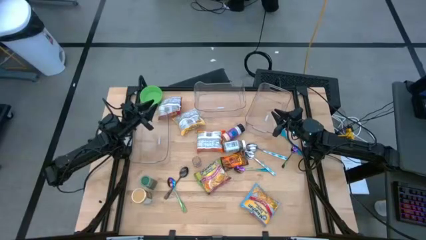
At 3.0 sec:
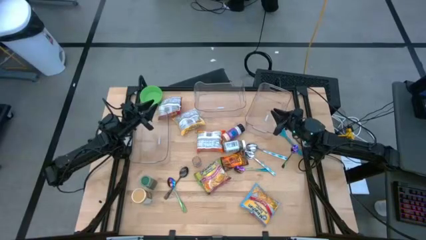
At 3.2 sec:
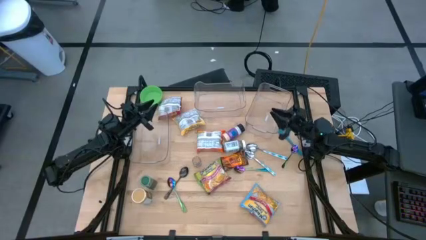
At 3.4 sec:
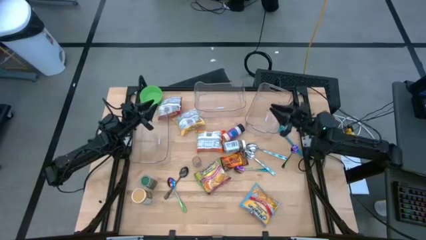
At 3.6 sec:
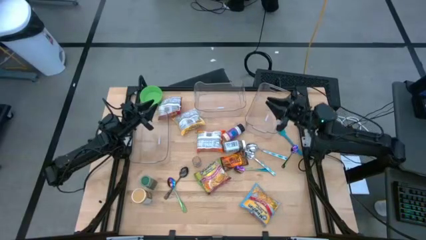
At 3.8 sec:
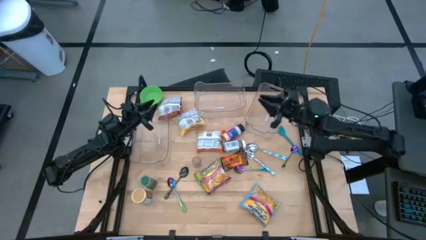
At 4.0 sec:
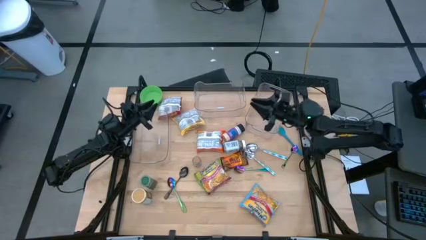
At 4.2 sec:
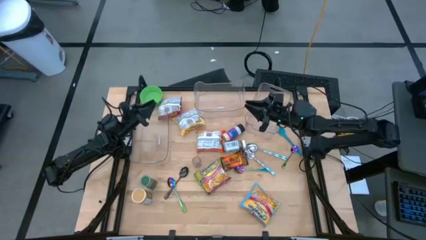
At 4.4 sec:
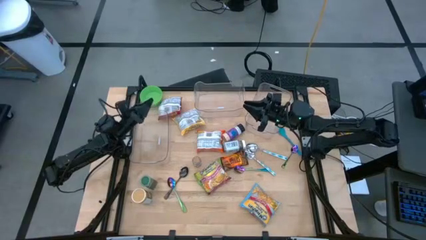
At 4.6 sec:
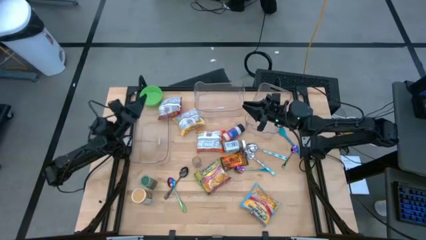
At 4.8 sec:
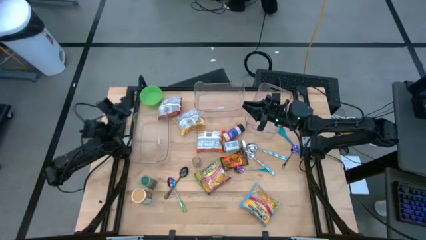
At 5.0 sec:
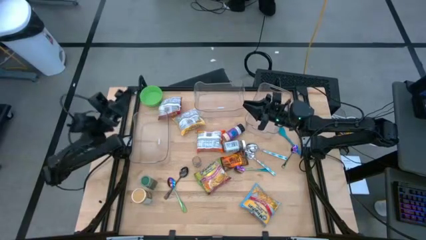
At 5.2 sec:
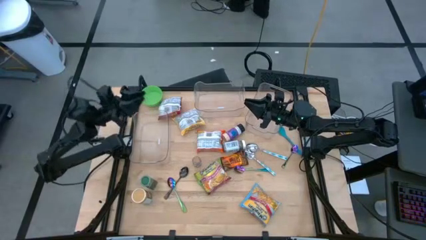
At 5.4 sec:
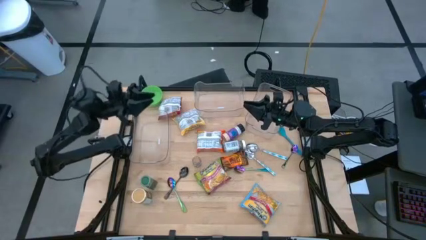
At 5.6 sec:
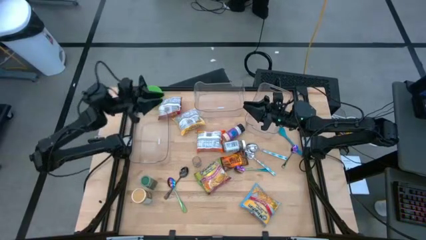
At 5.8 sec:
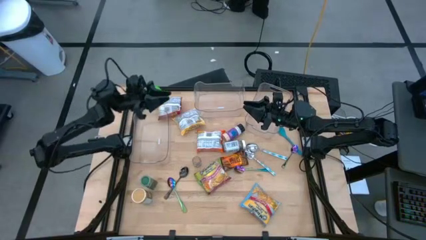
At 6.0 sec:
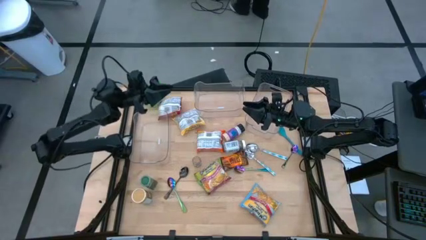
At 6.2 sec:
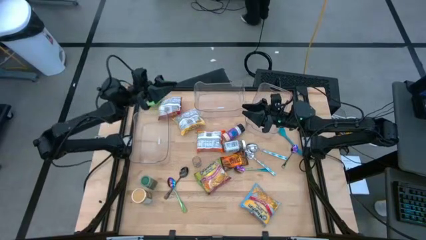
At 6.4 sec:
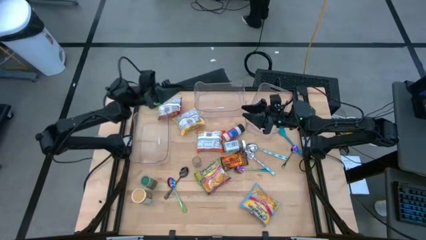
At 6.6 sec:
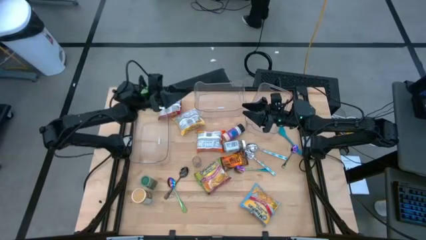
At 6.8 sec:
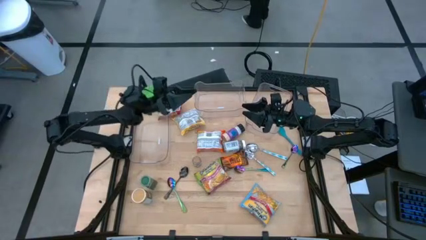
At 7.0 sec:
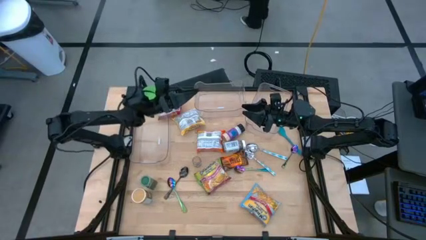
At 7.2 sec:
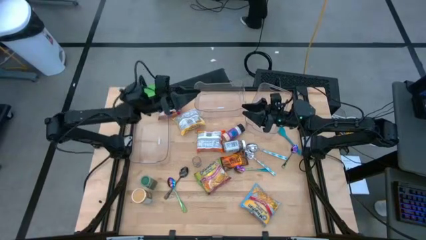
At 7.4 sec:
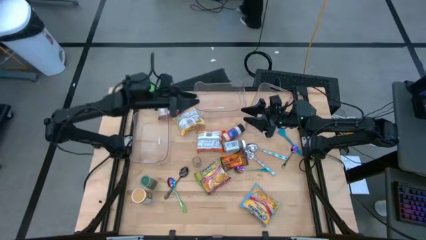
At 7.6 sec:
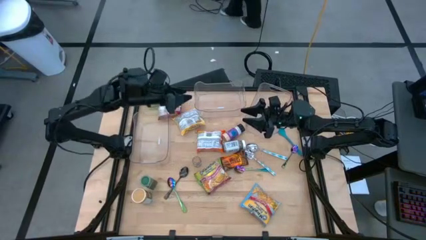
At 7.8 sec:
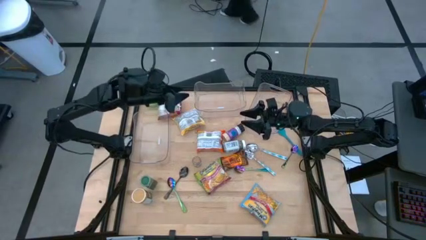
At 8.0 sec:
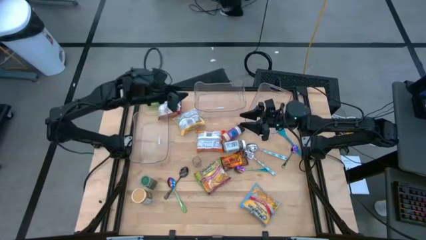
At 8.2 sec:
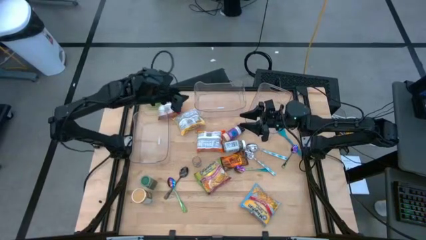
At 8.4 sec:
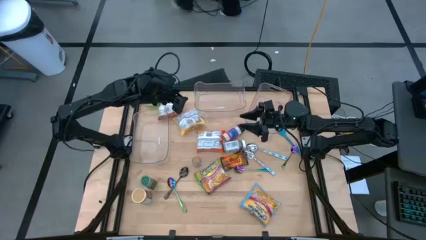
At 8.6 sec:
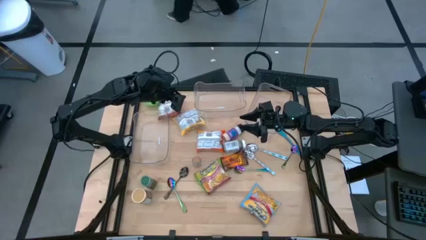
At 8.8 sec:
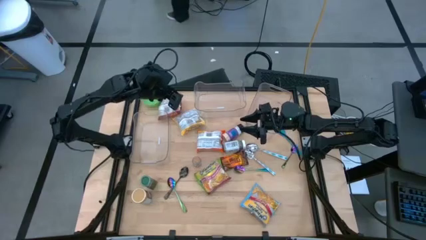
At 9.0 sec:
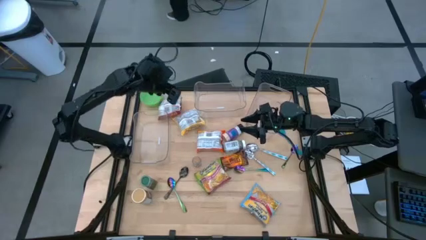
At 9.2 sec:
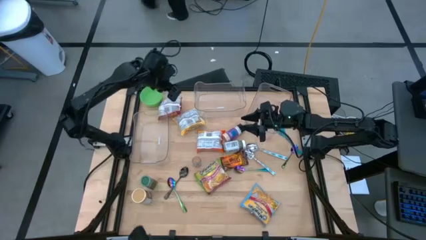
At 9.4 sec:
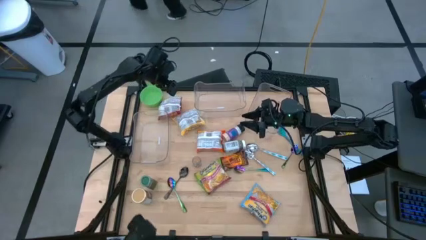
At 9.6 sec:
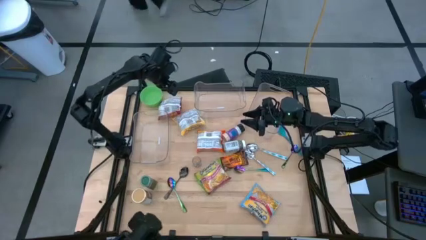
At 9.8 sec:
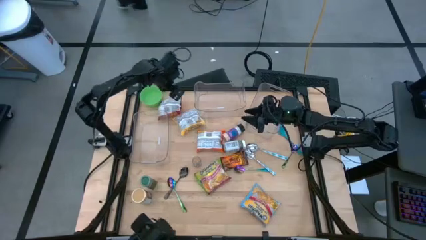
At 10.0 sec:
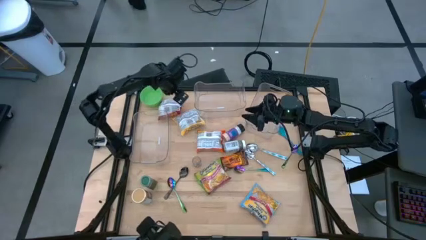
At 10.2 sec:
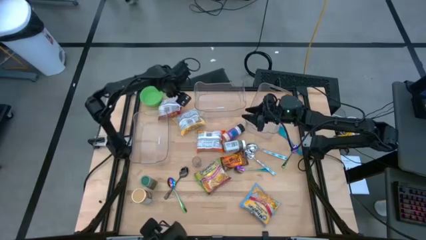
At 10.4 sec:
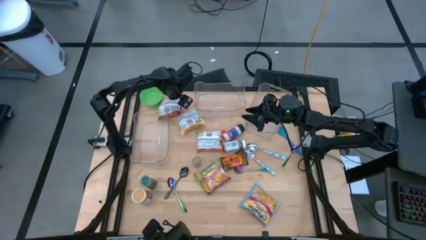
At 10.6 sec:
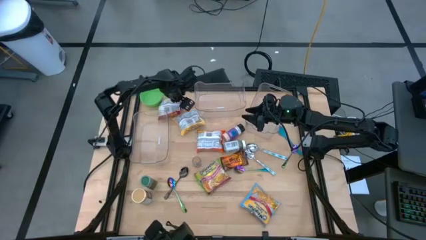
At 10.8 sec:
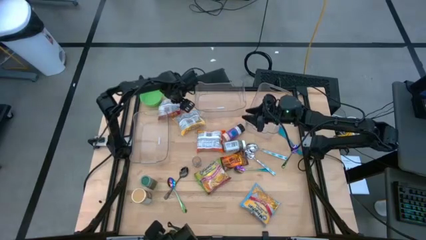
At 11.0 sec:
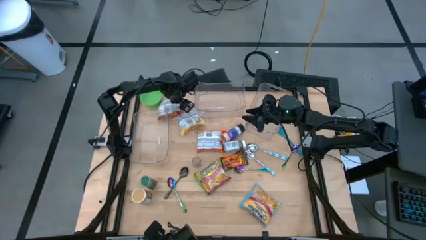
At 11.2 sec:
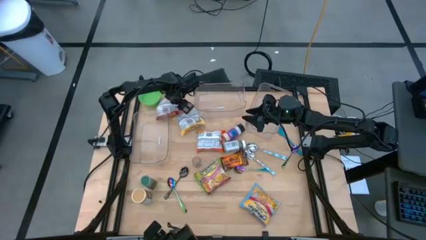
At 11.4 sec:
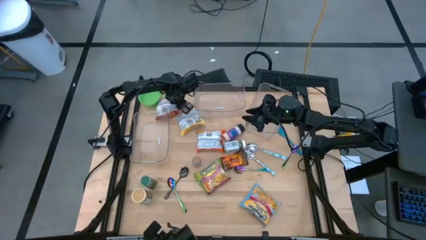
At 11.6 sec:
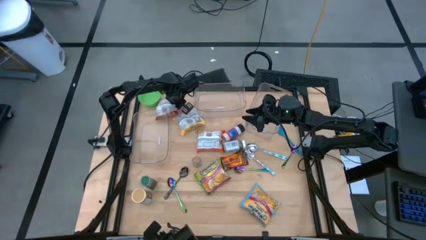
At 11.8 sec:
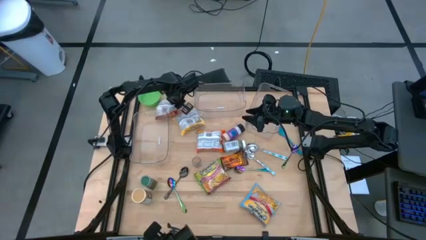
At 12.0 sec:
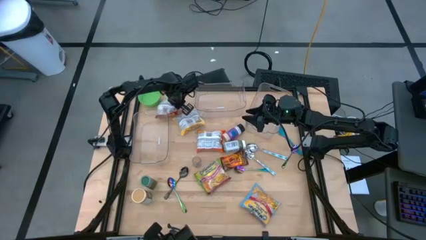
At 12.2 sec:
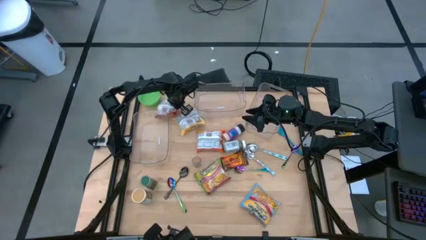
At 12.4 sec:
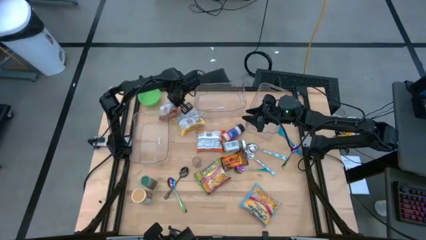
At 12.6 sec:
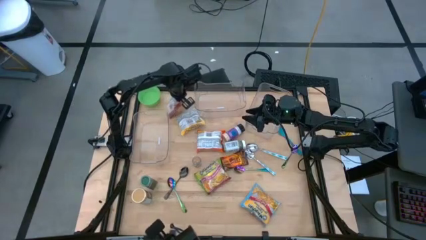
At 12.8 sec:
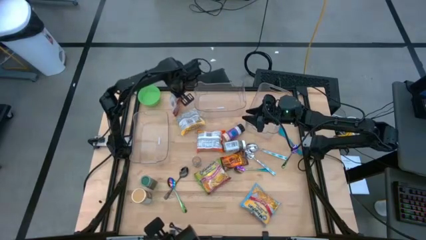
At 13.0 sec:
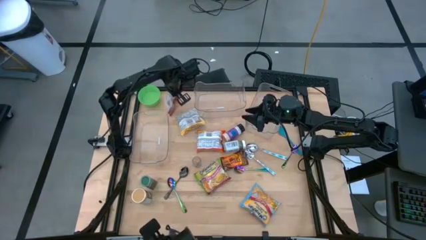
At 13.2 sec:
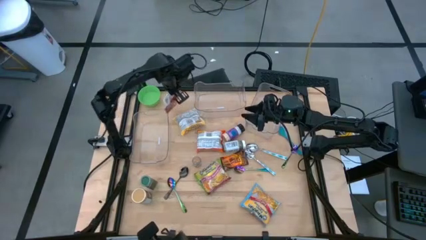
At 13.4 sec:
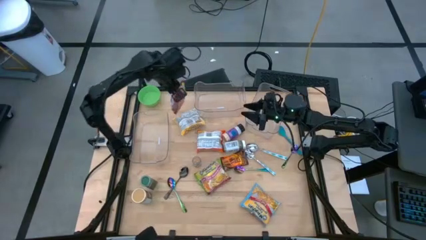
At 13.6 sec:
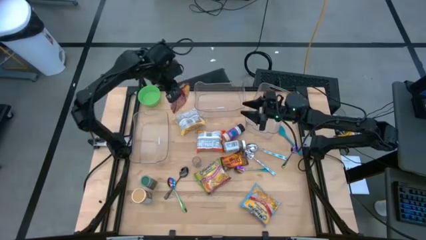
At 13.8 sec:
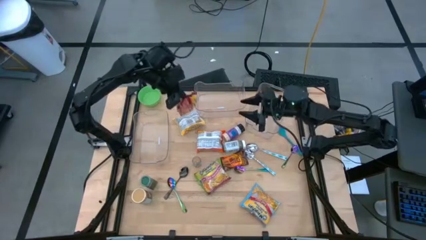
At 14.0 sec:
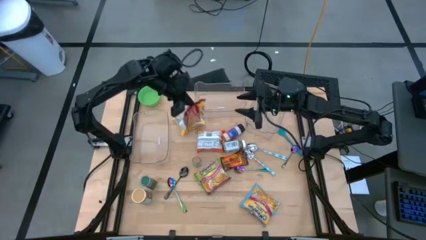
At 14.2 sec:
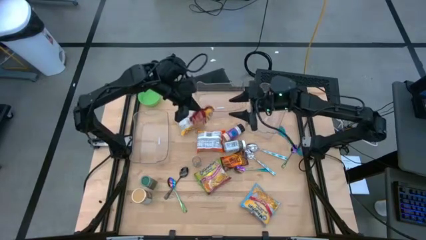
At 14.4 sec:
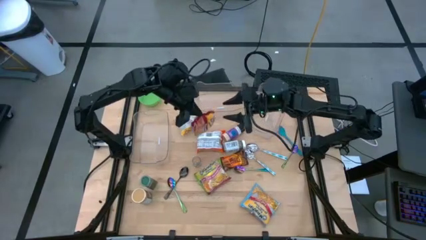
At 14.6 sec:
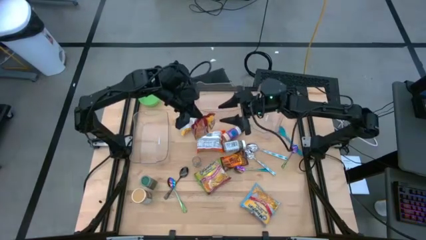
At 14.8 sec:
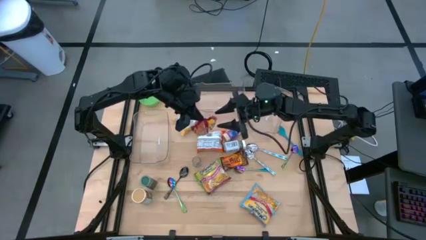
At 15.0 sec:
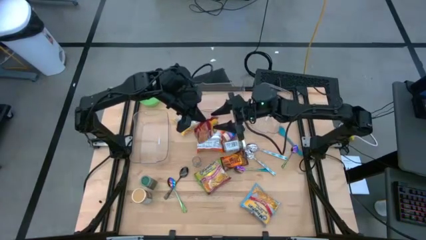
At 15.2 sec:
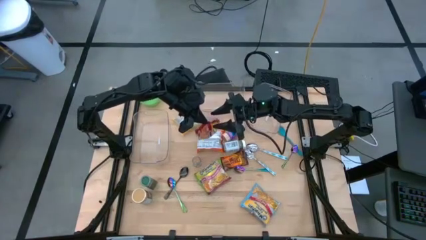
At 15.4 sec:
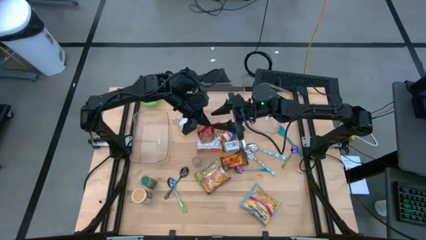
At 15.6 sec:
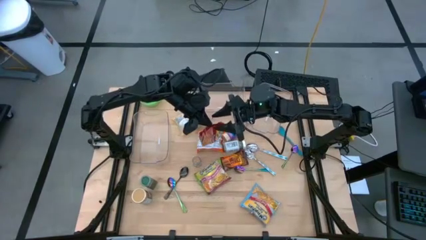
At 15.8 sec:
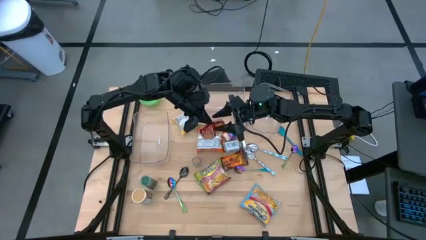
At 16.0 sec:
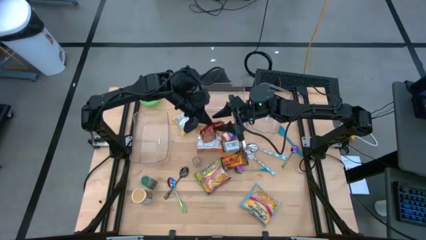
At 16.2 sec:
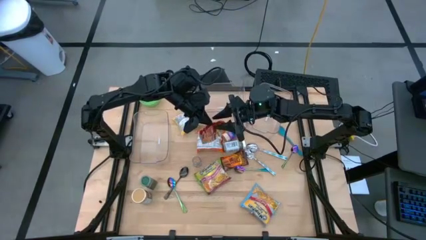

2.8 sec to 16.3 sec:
Task: Pick & Place Food Item
Put the red noodle pack into the right transparent bin
